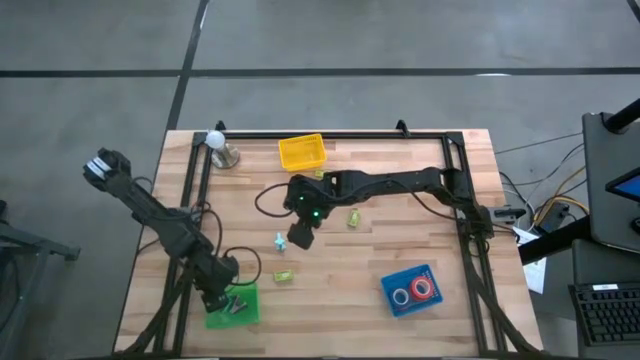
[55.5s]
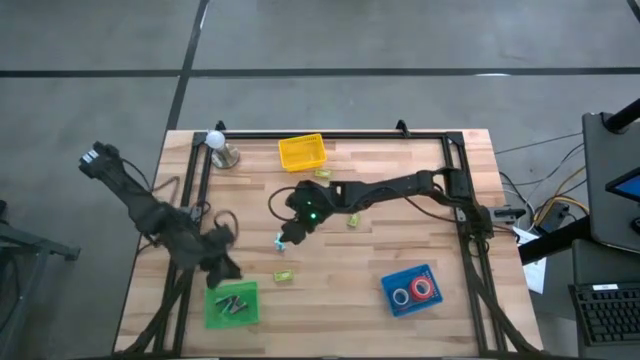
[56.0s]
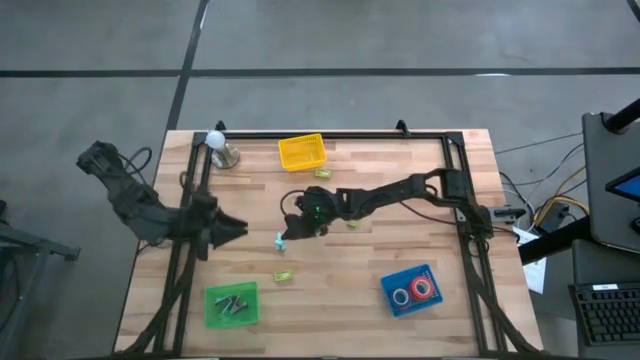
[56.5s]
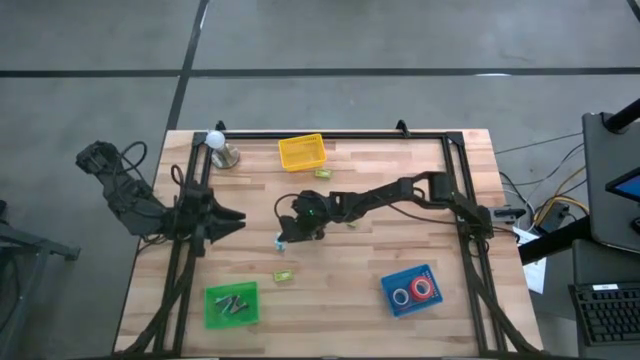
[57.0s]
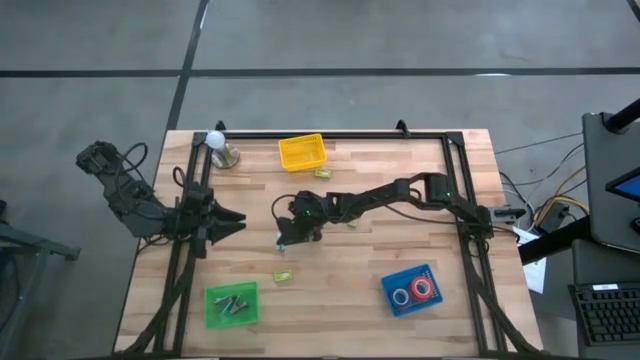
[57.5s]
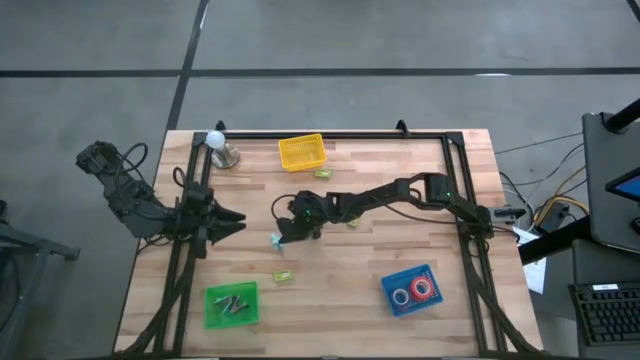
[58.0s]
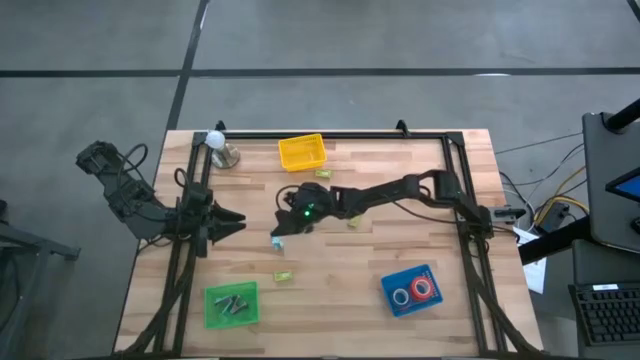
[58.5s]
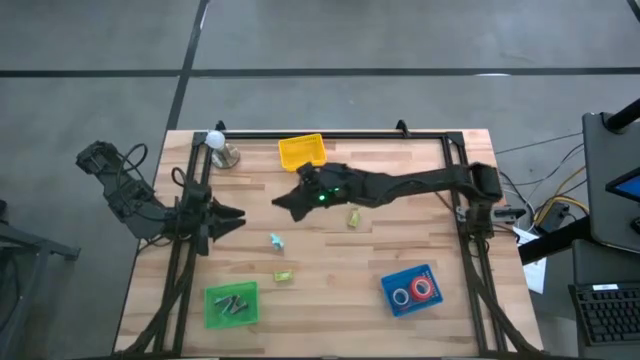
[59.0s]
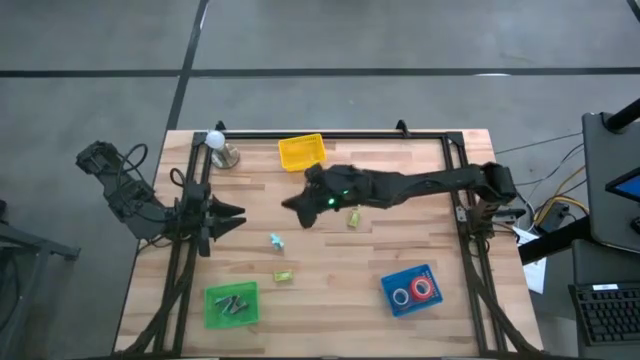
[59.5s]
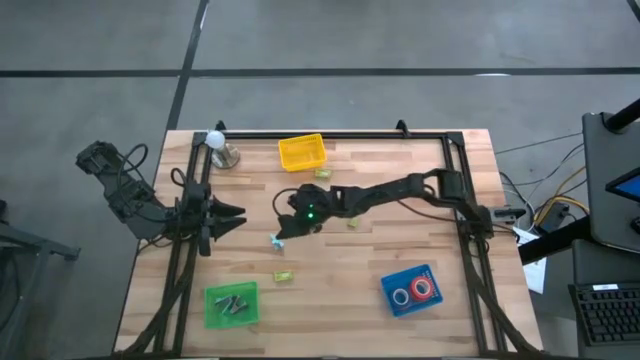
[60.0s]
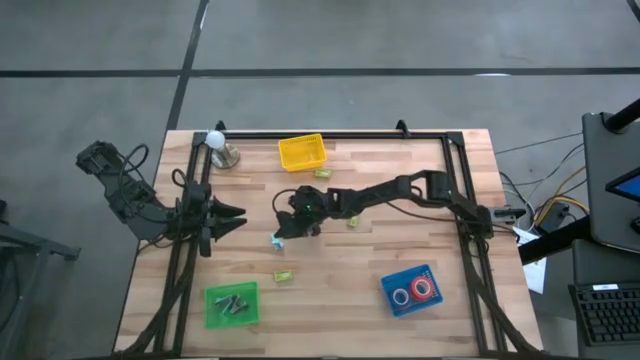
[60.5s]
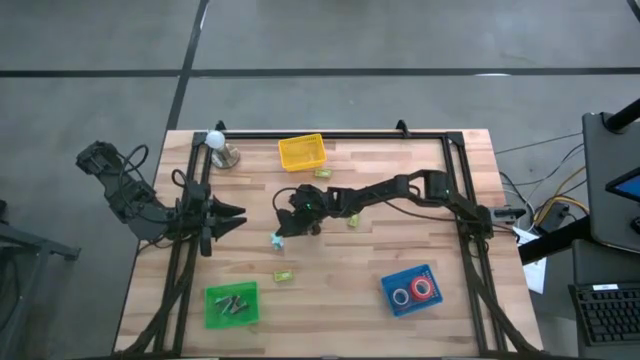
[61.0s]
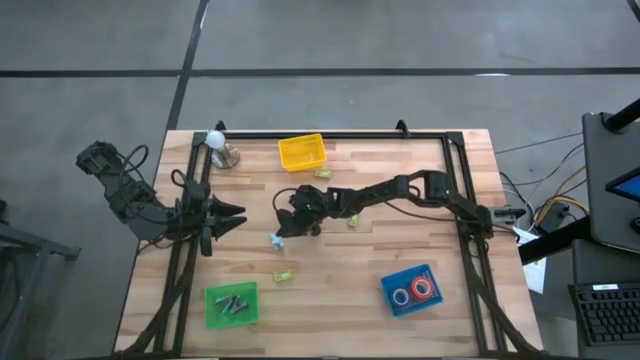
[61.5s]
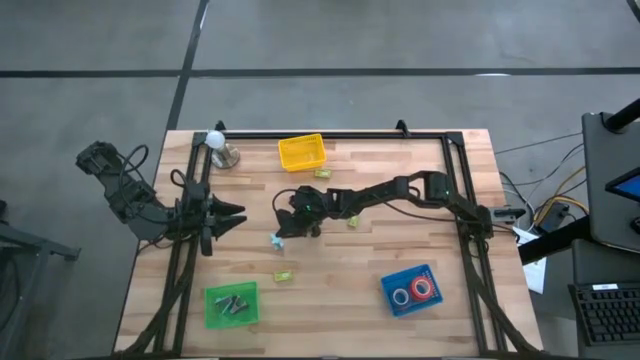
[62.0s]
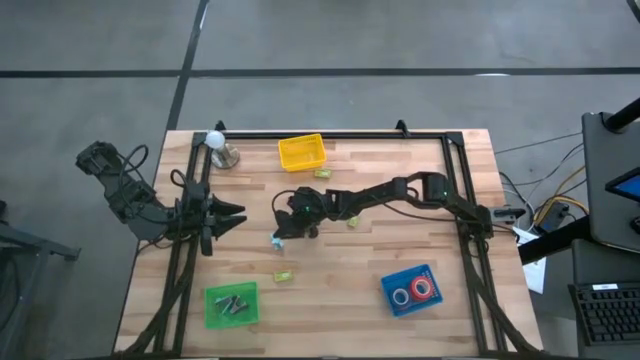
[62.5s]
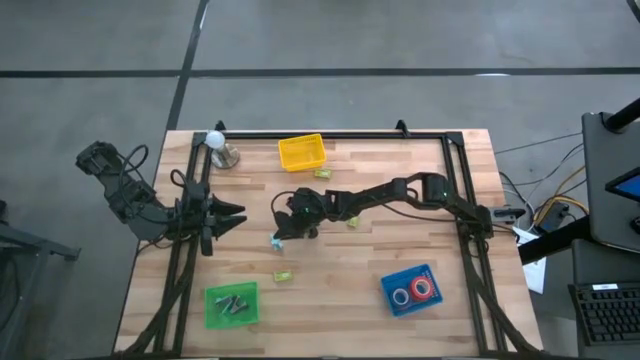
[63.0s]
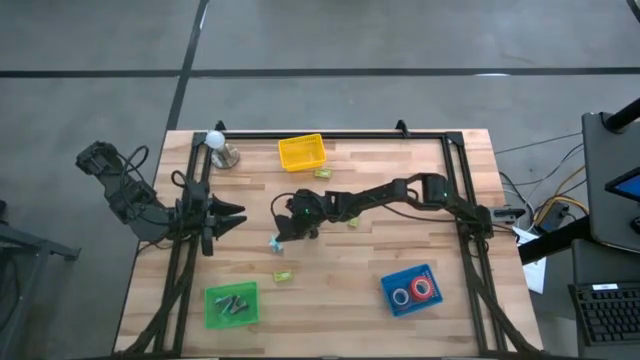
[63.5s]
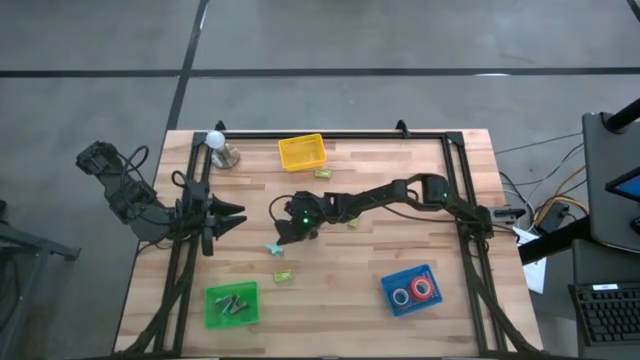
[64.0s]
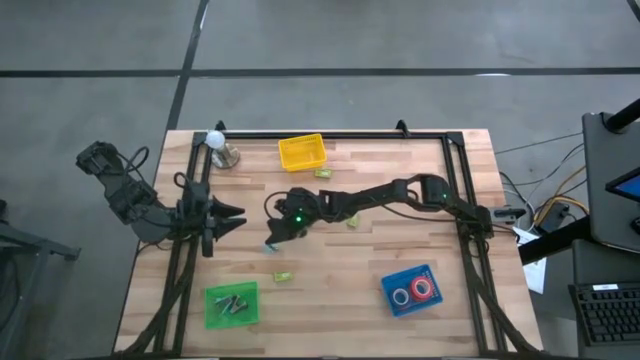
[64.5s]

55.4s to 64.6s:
Task: Pick and place Stapler, Stapler remover, tape
Put the light blue staple remover into the green basket

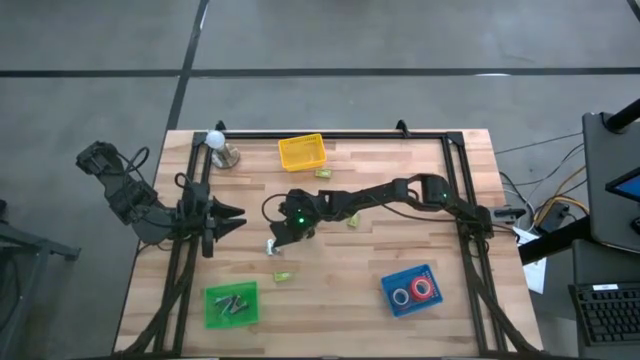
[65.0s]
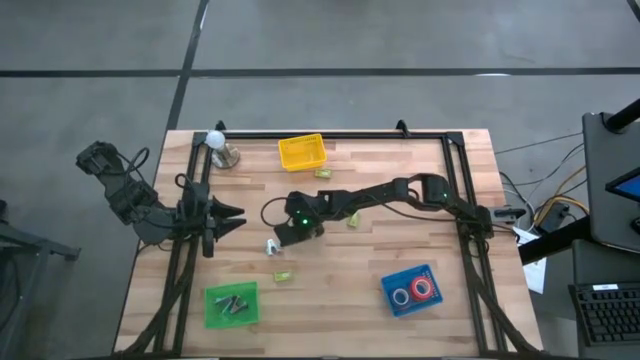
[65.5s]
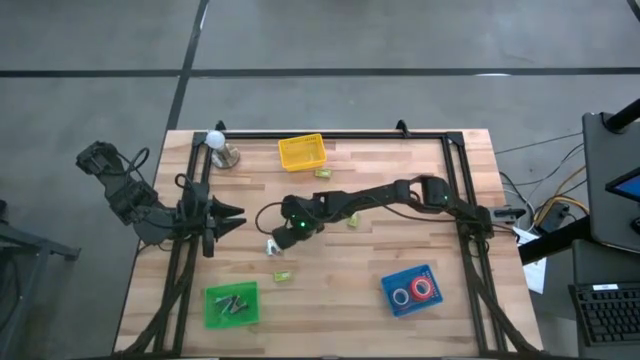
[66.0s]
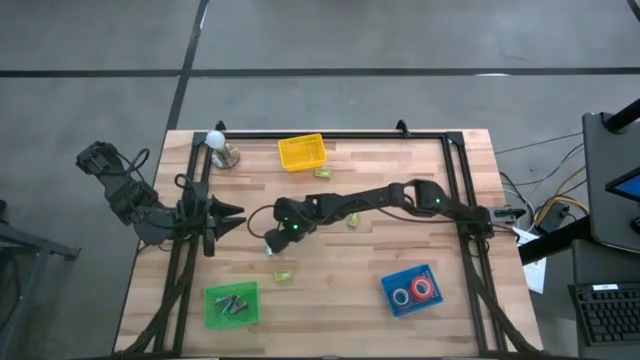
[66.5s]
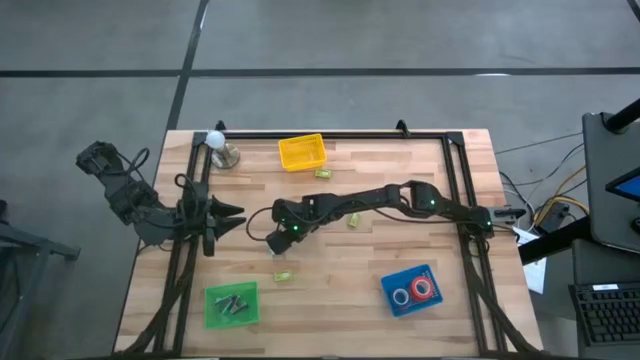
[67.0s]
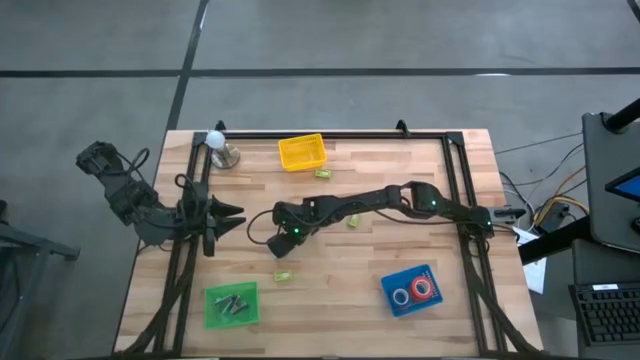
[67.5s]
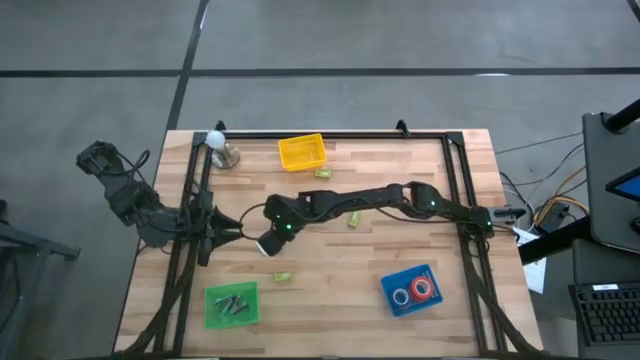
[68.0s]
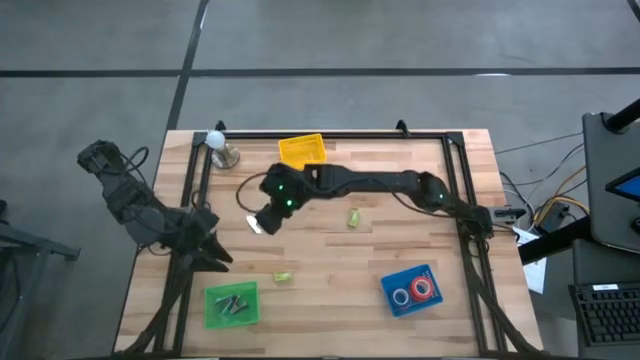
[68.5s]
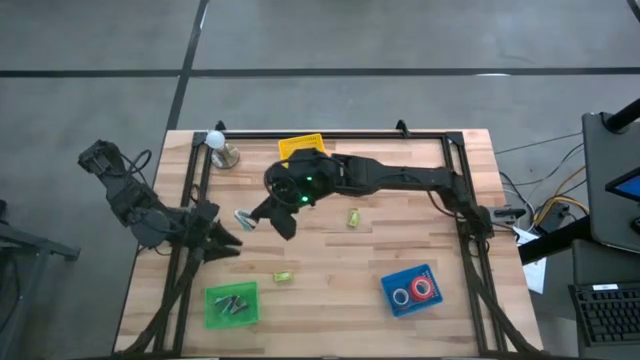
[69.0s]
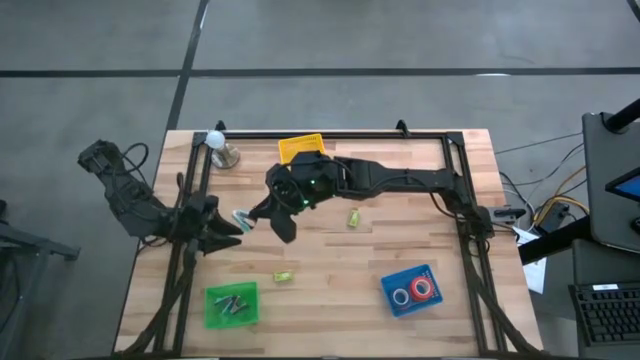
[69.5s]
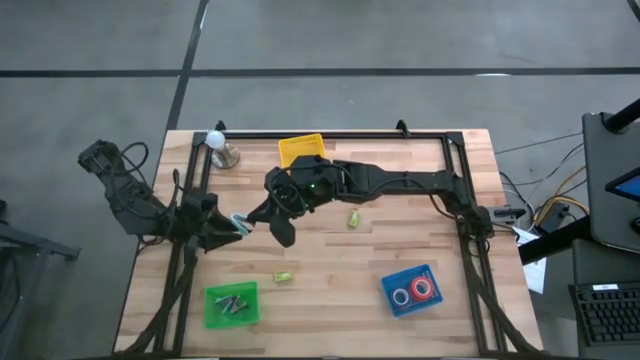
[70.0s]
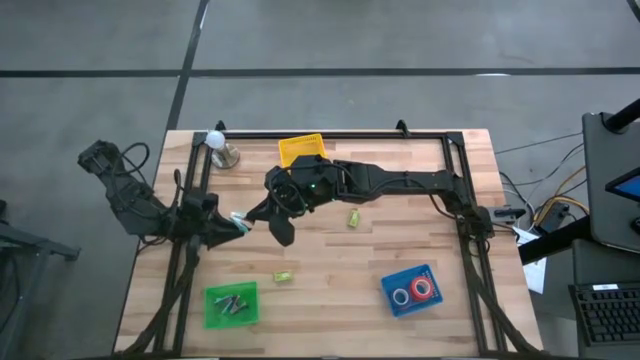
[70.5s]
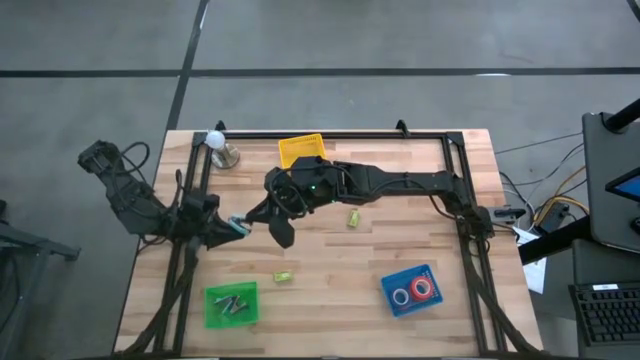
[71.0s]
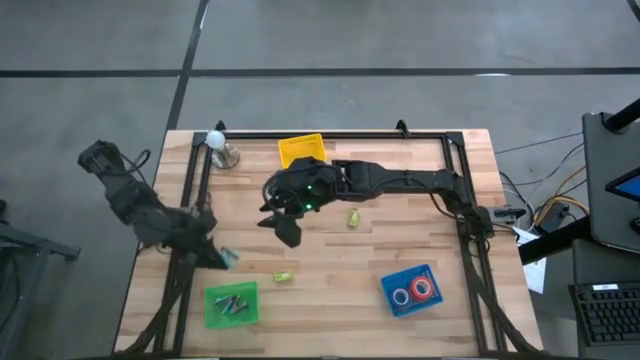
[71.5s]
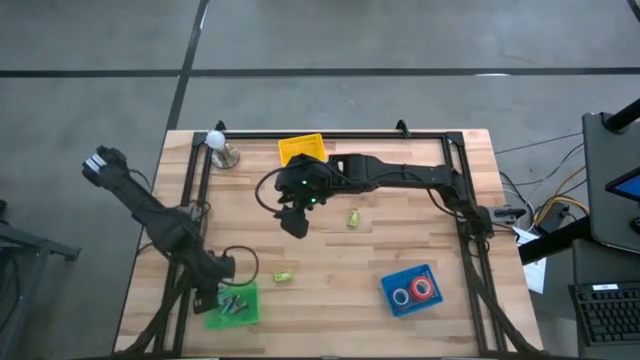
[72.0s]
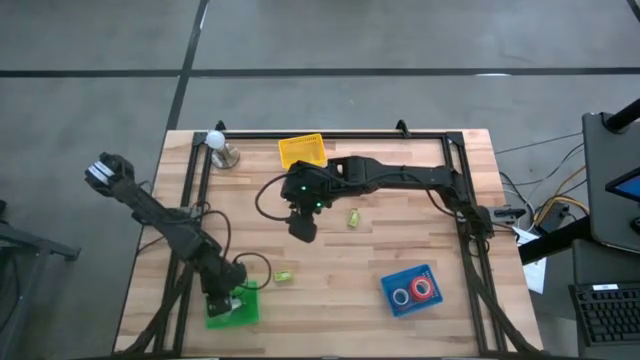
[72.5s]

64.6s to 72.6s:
Put the light blue staple remover into the green basket

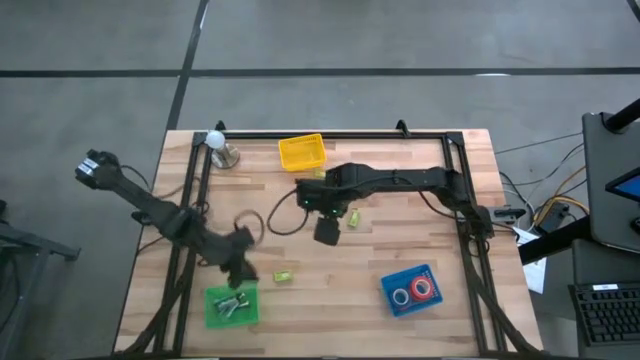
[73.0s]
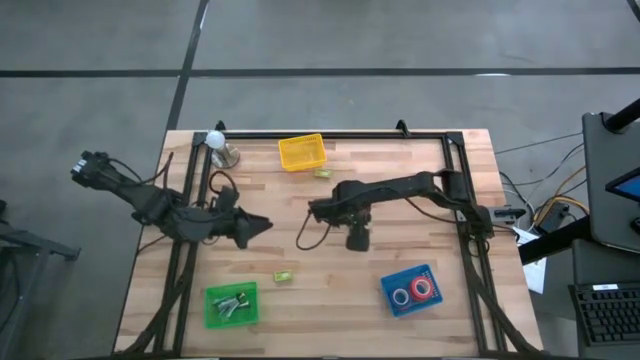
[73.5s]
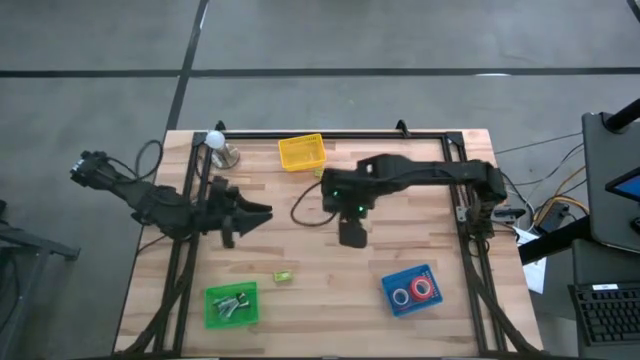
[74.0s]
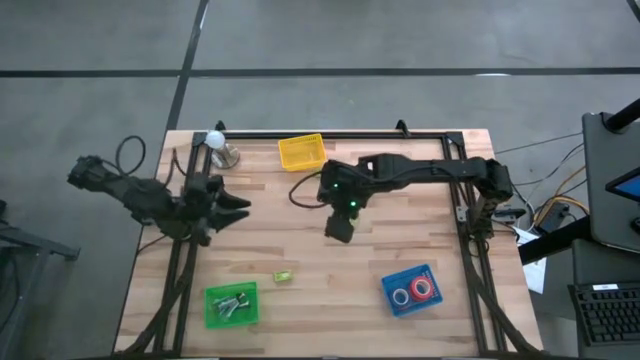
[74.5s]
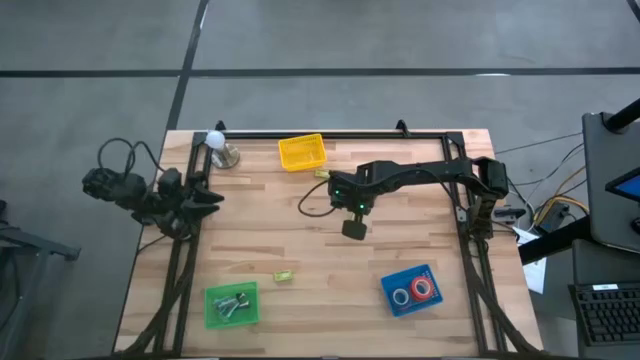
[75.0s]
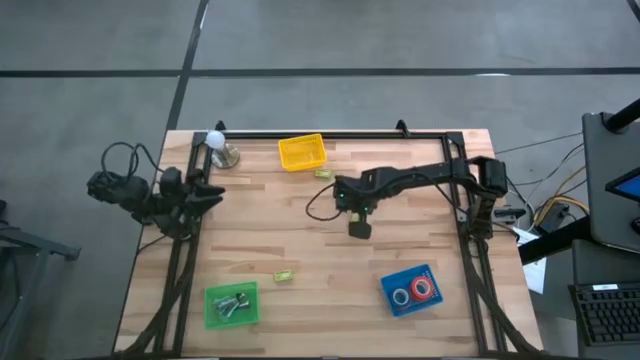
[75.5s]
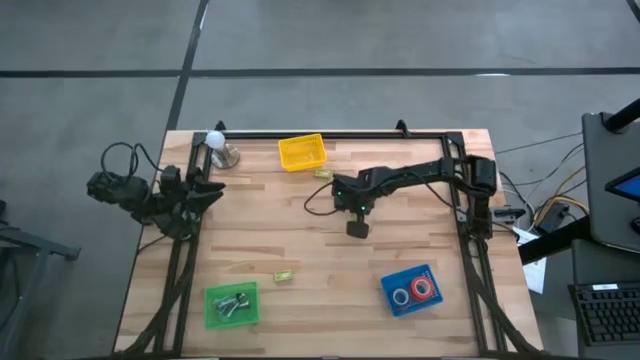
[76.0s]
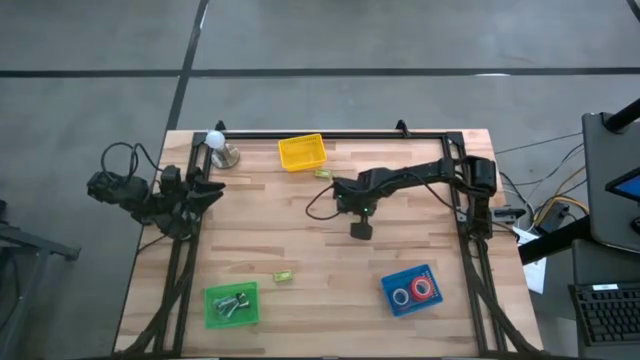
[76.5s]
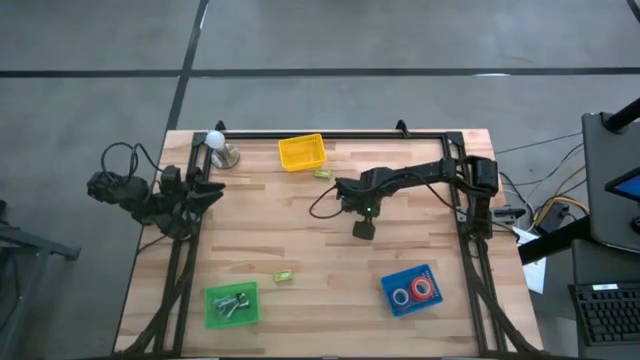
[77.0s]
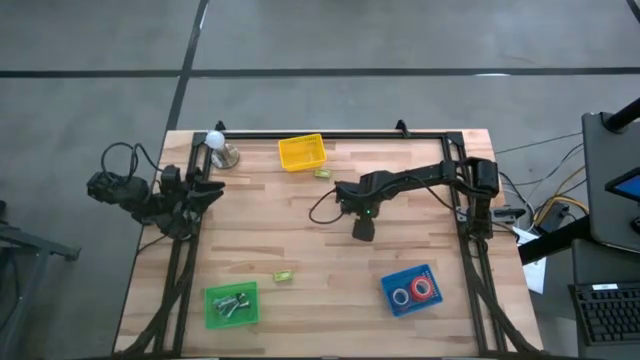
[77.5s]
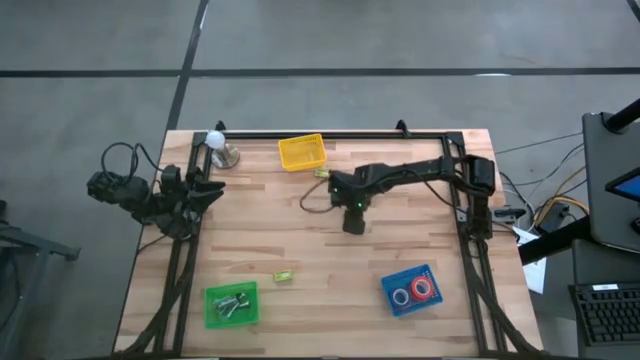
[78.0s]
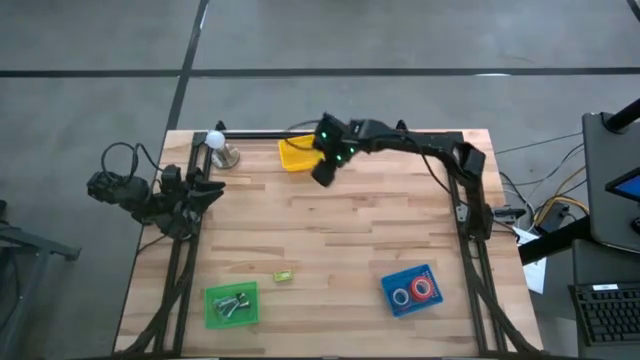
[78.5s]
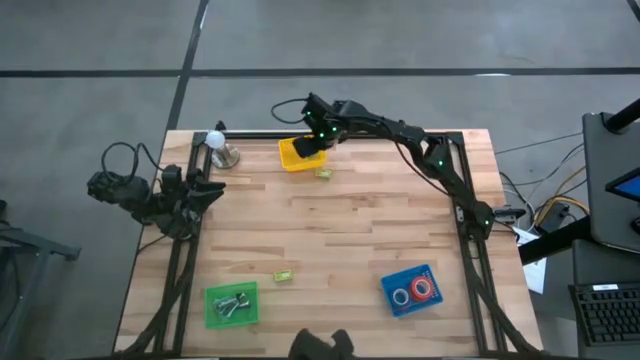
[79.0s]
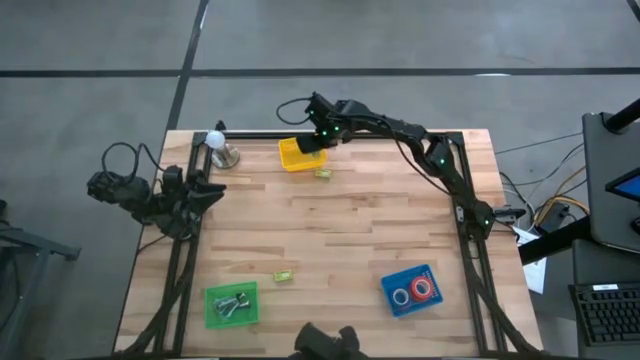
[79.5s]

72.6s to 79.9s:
Put the middle green staple box into the yellow basket
